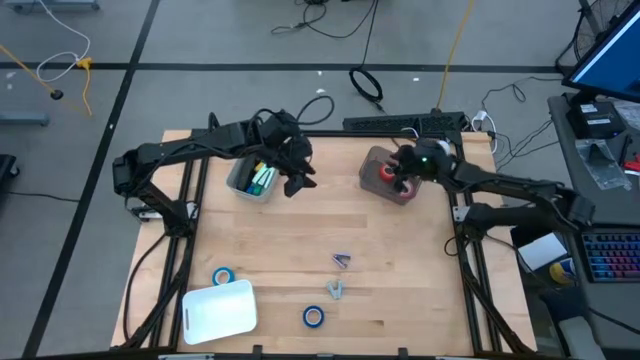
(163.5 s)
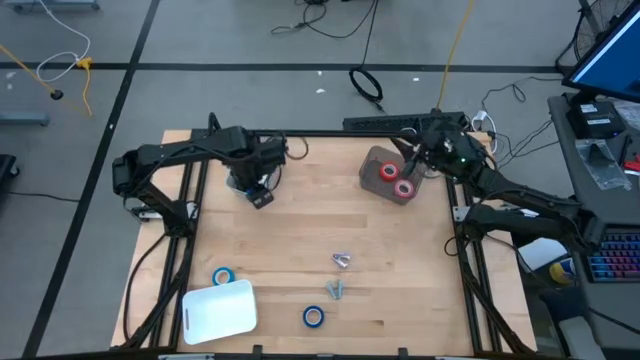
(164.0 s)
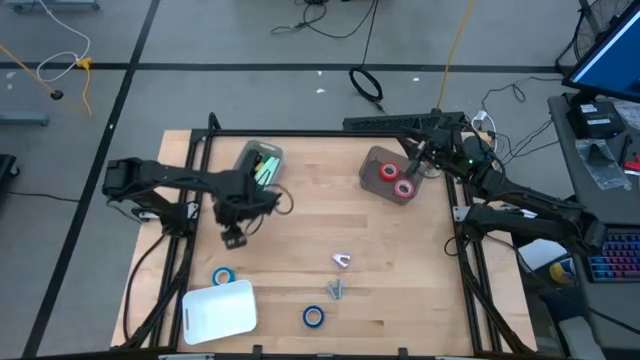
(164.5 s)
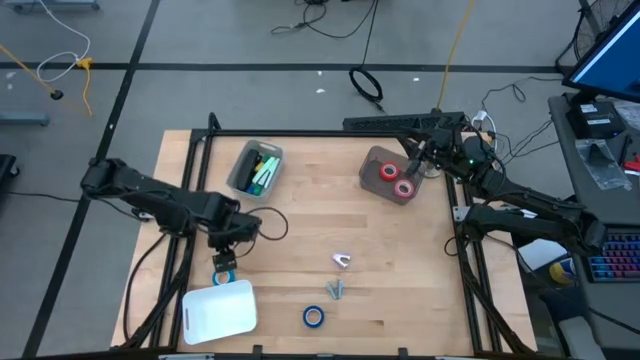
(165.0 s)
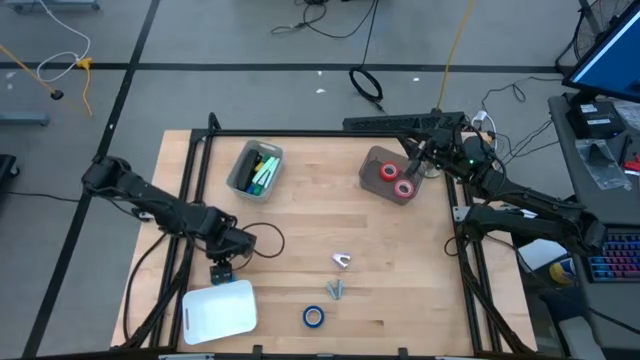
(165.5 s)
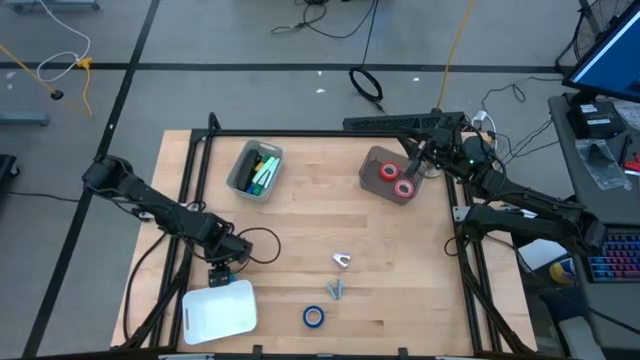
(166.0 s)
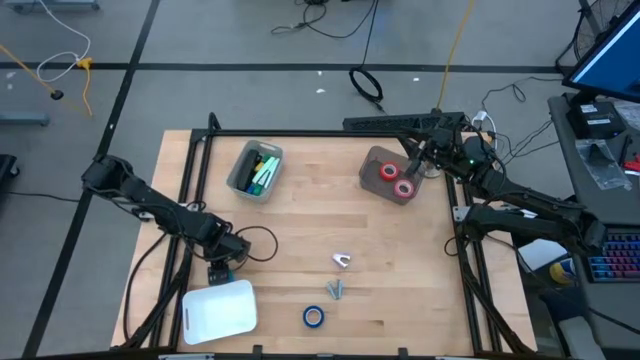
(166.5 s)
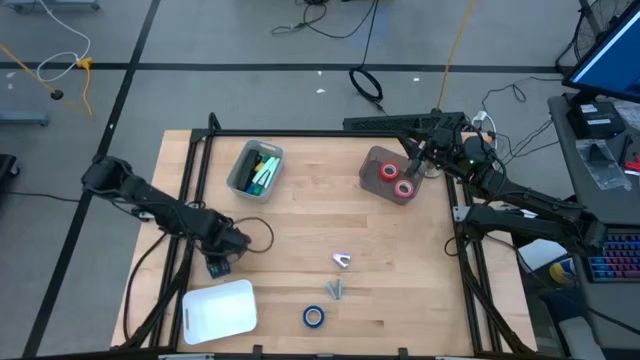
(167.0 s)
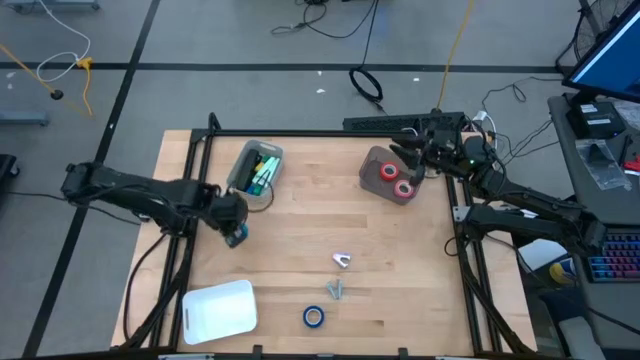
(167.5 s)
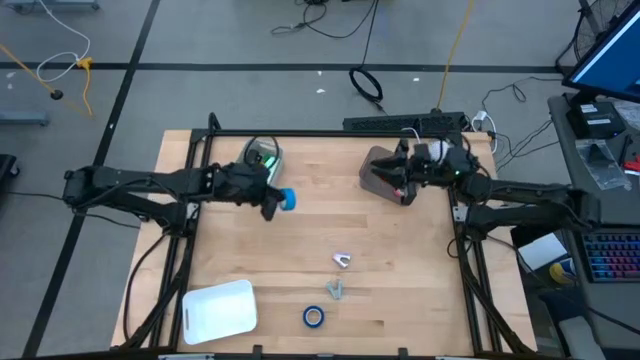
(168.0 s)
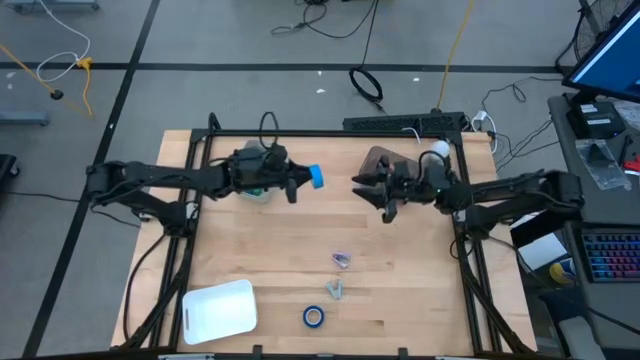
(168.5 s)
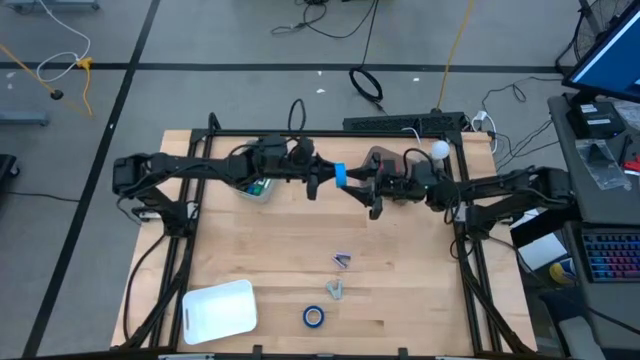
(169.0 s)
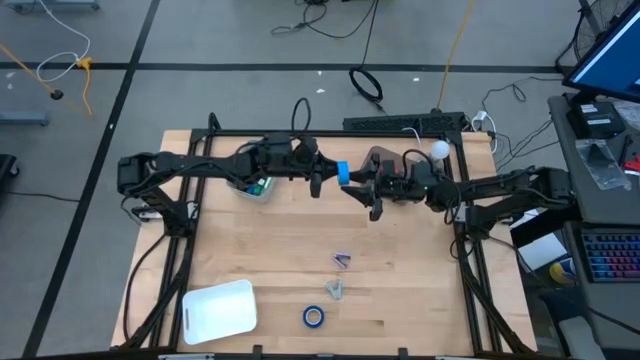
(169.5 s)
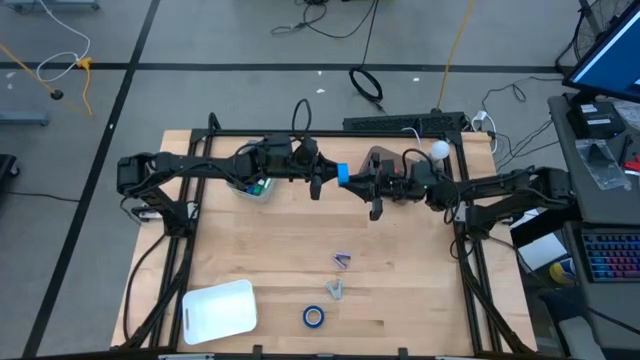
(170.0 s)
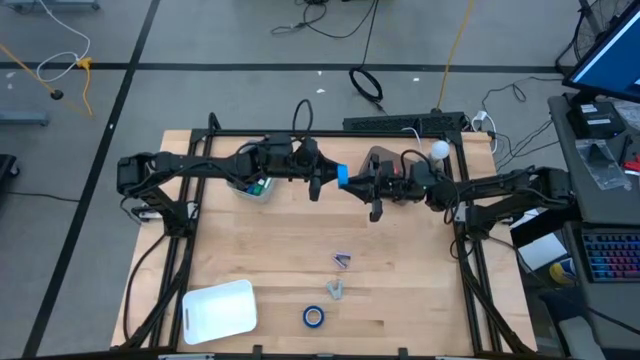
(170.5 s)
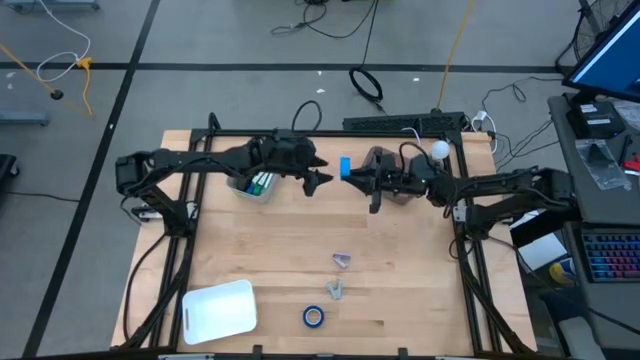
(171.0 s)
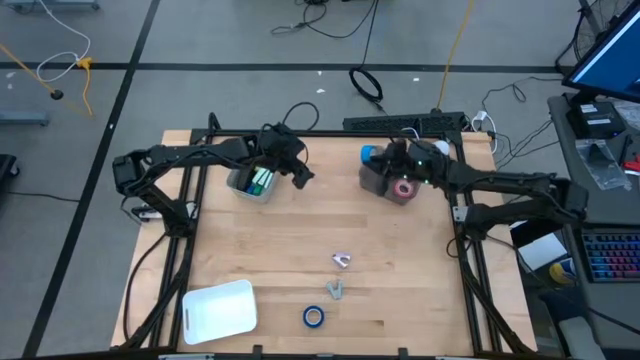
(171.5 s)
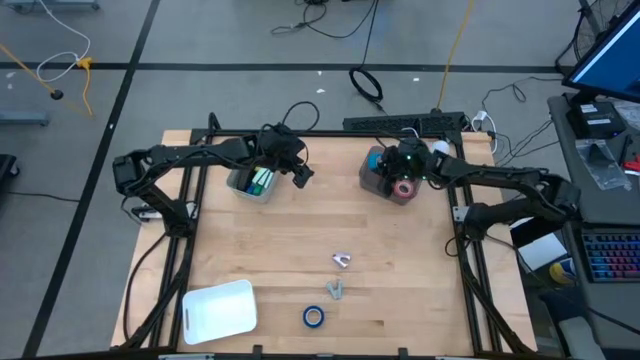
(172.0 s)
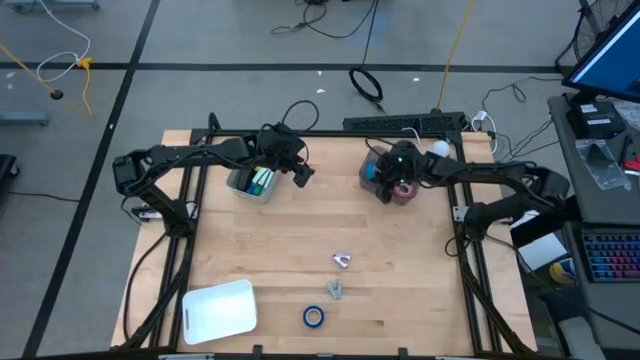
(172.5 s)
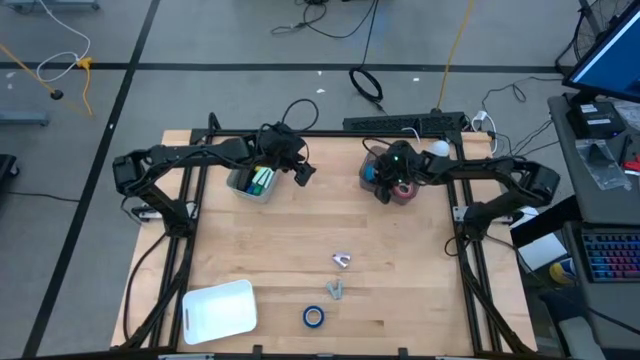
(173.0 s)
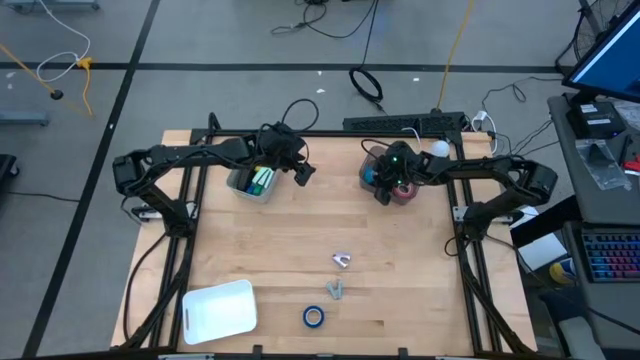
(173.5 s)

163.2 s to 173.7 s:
Task: Pick and place Stapler, Stapler remover, tape
Put the light blue tape into the black bin

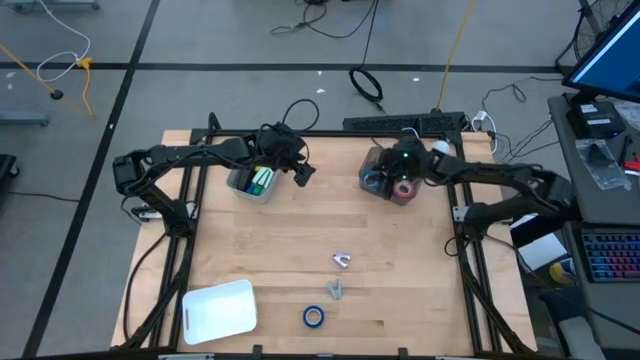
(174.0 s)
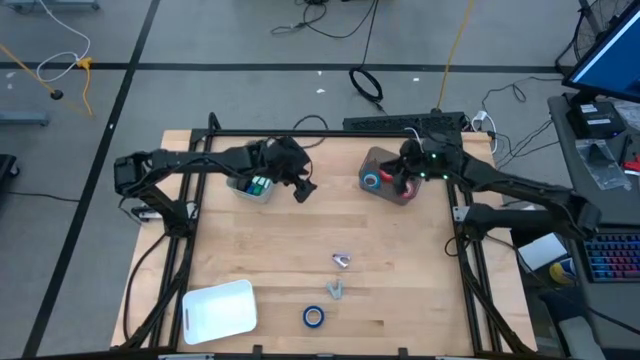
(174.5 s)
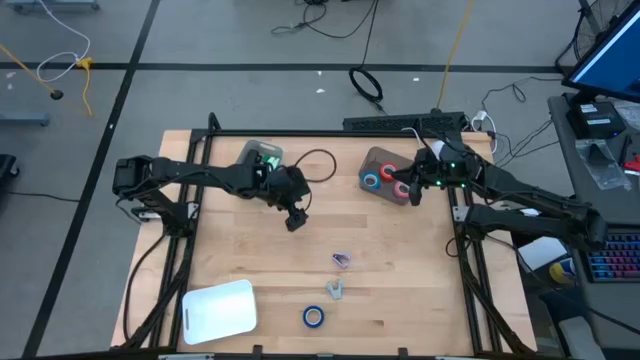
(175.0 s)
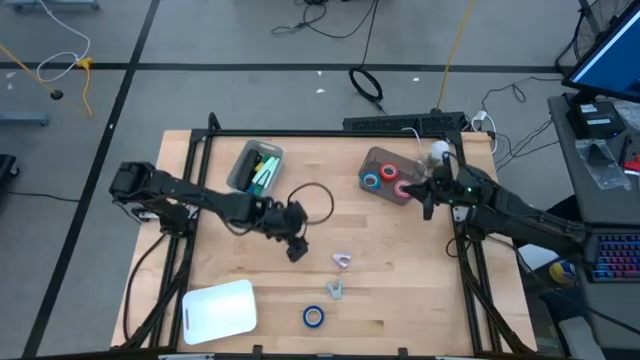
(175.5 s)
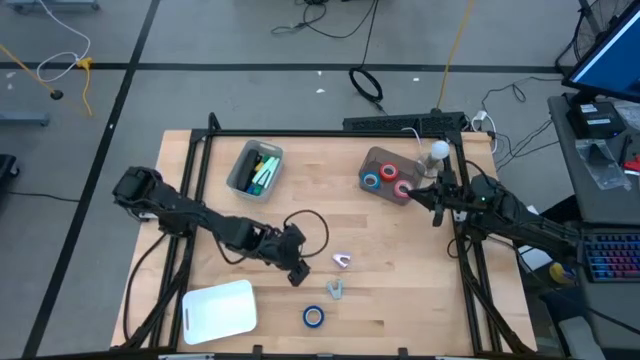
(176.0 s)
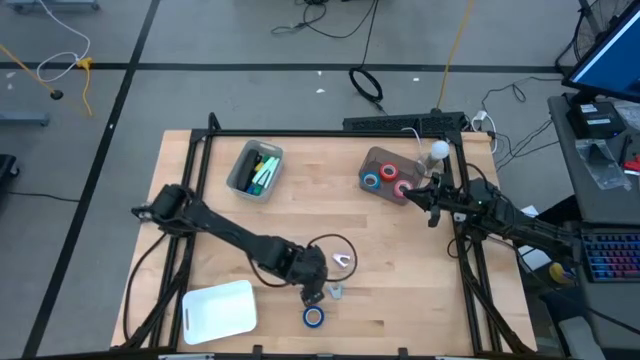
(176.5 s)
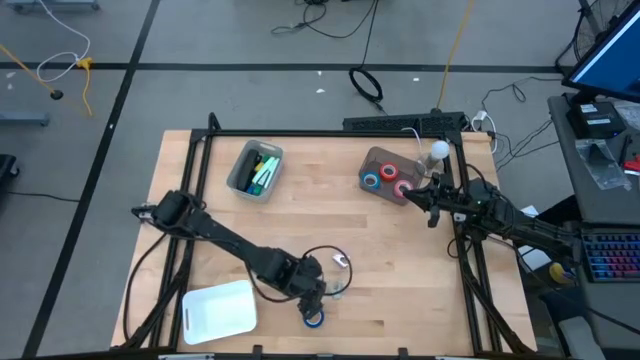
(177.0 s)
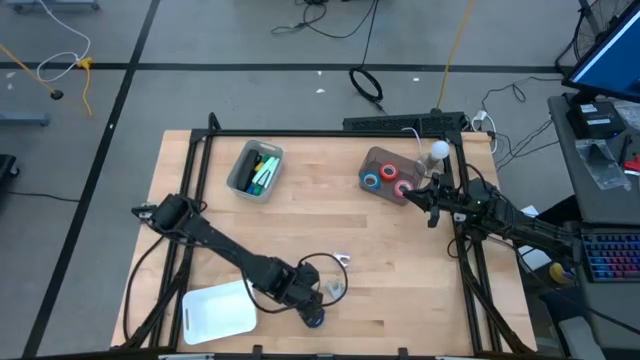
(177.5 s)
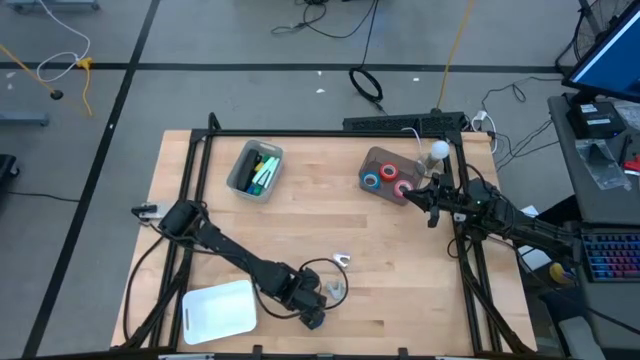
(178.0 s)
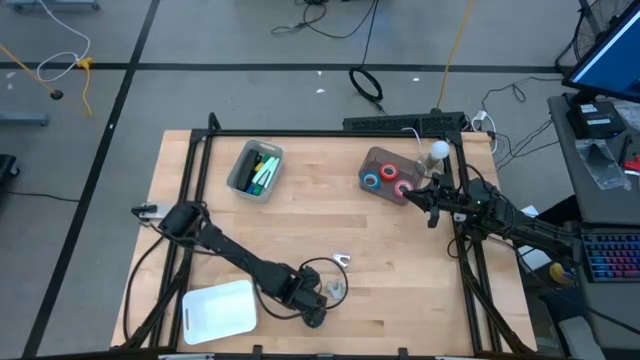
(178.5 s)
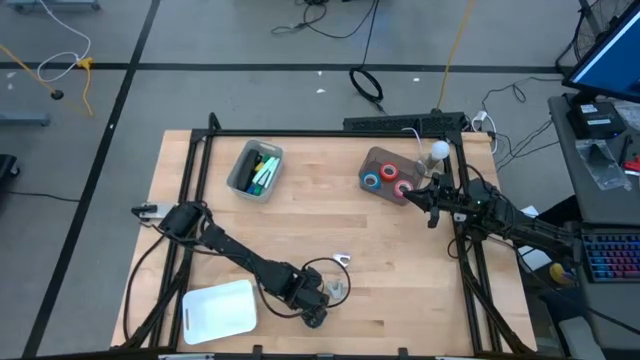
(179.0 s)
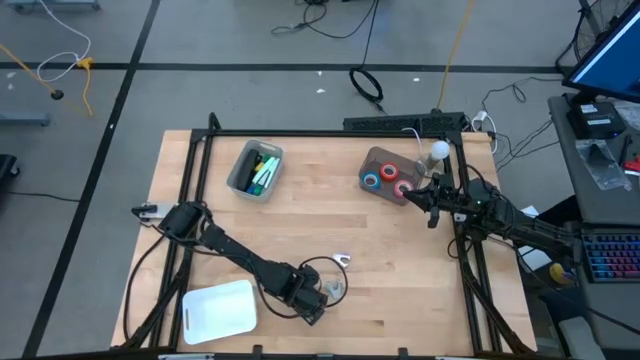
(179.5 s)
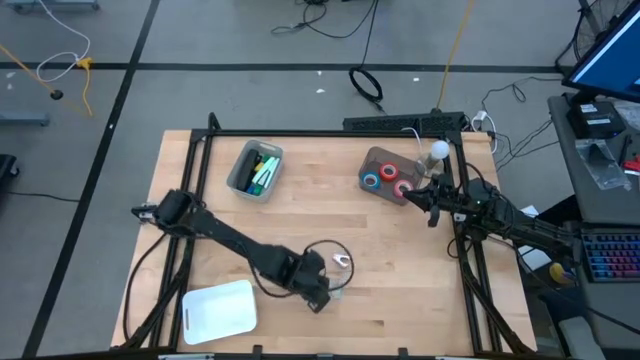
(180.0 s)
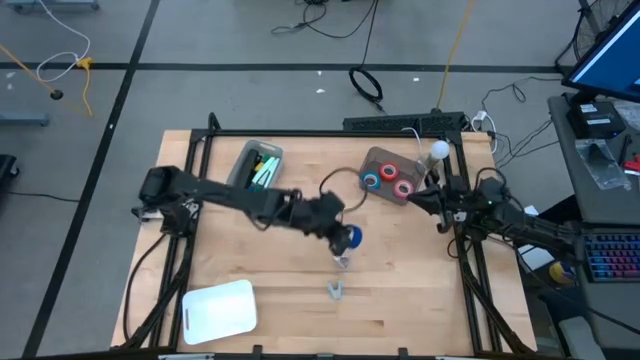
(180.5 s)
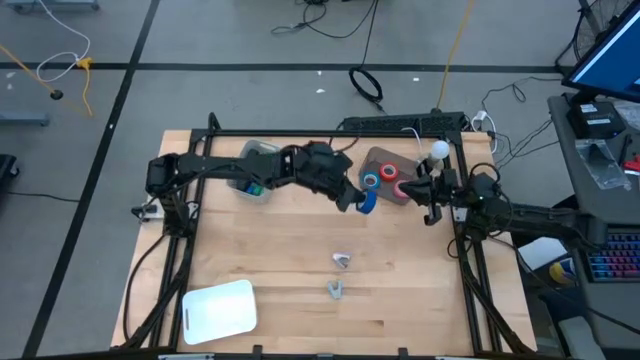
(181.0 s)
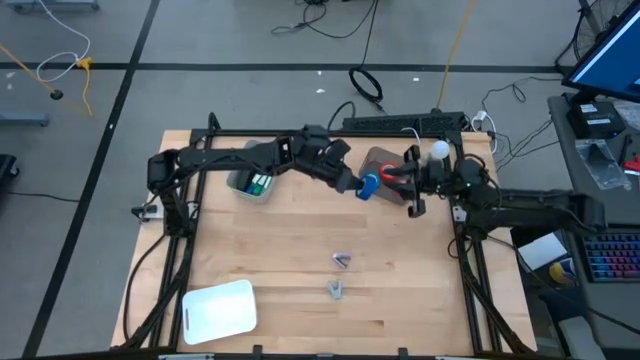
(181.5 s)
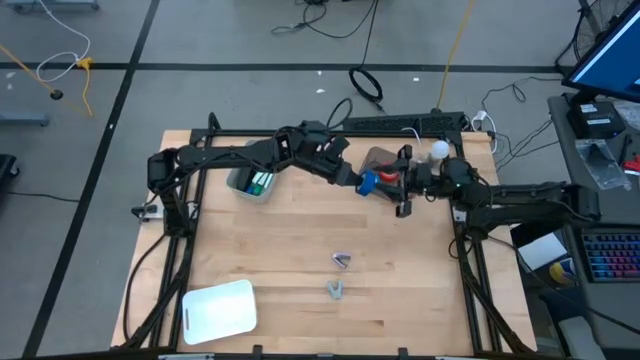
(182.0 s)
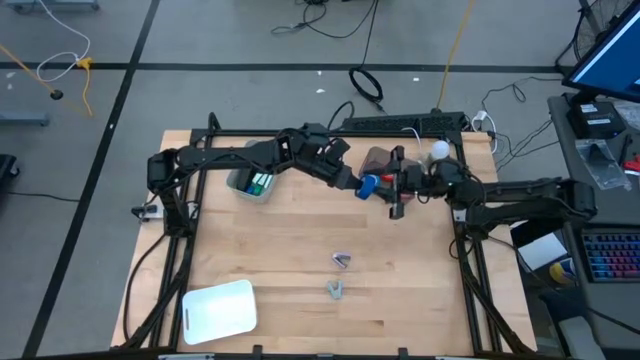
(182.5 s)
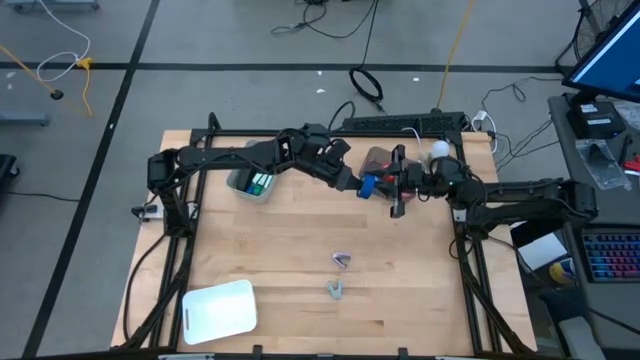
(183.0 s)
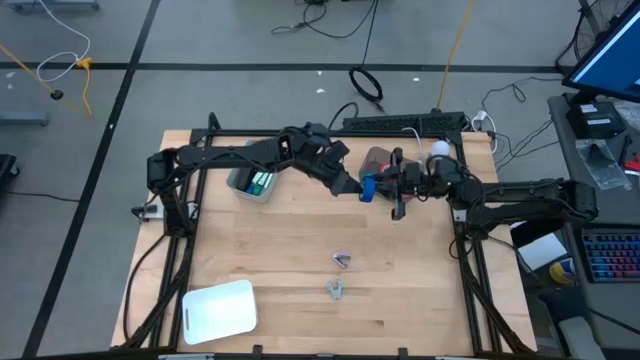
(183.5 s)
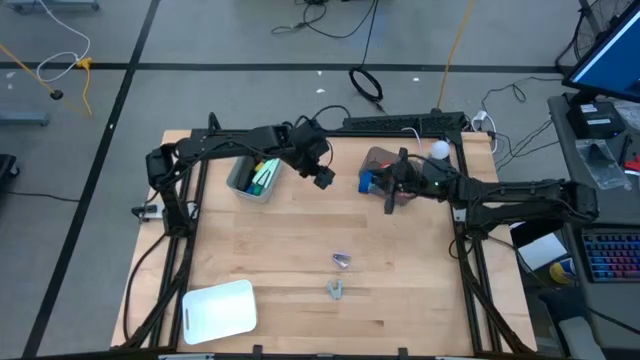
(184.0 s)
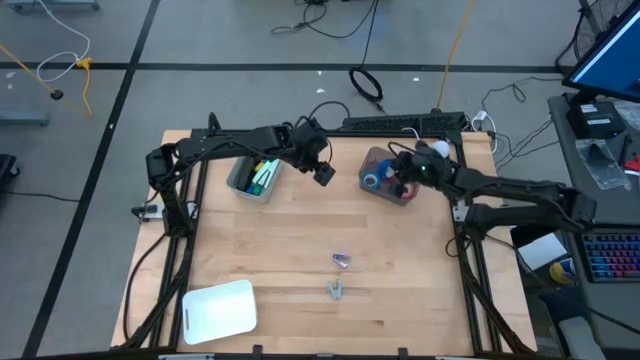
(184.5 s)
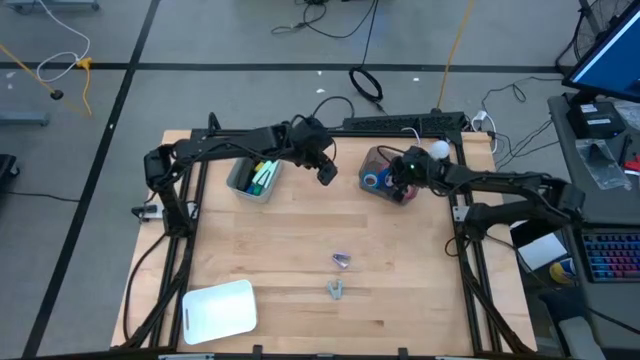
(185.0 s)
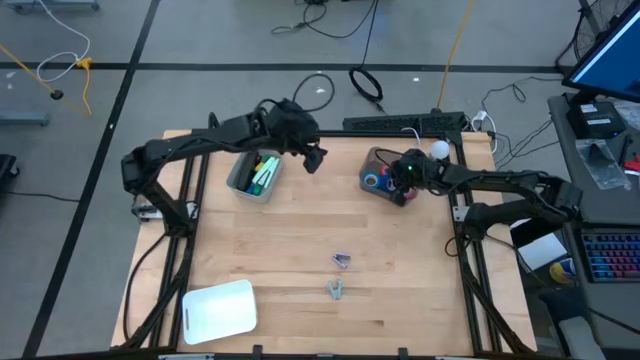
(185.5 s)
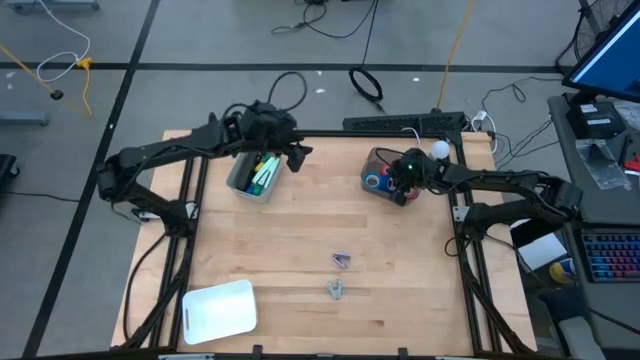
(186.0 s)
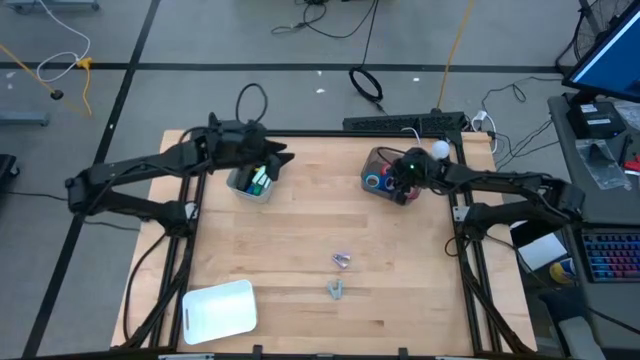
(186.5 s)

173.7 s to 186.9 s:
Put the blue tape into the black bin
